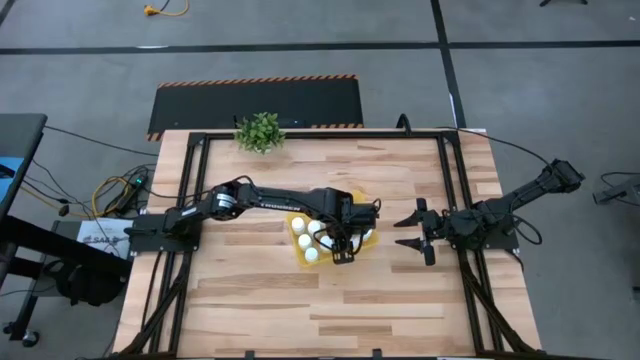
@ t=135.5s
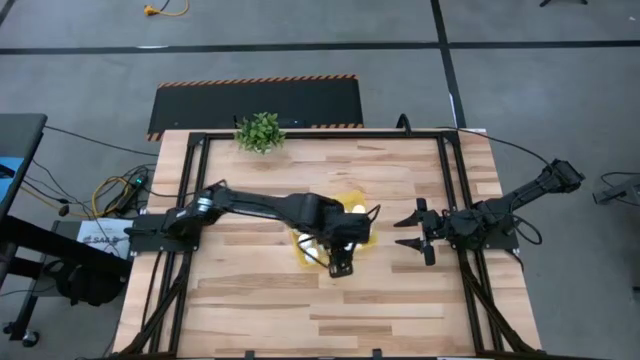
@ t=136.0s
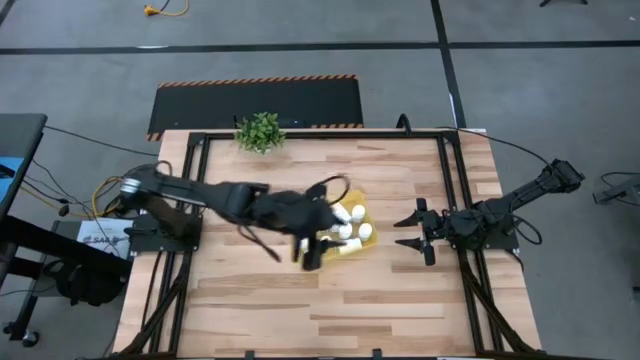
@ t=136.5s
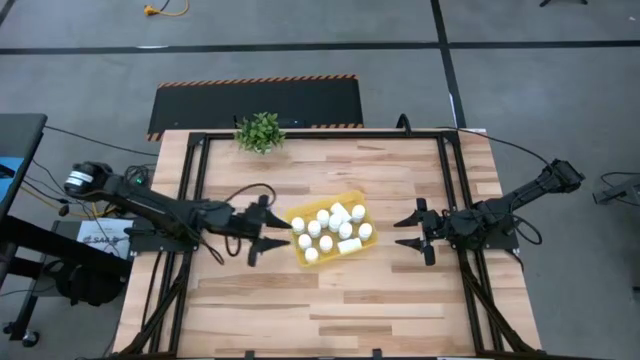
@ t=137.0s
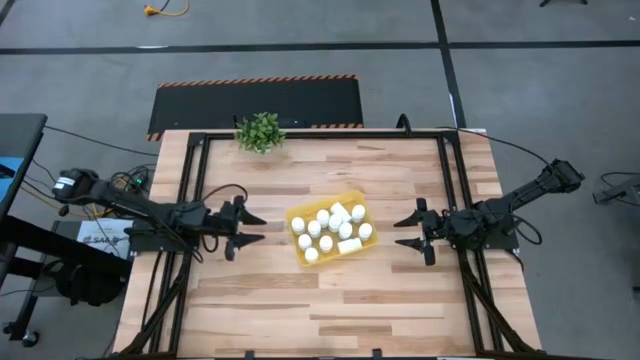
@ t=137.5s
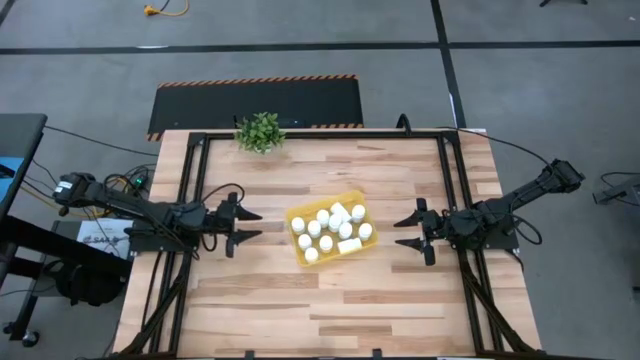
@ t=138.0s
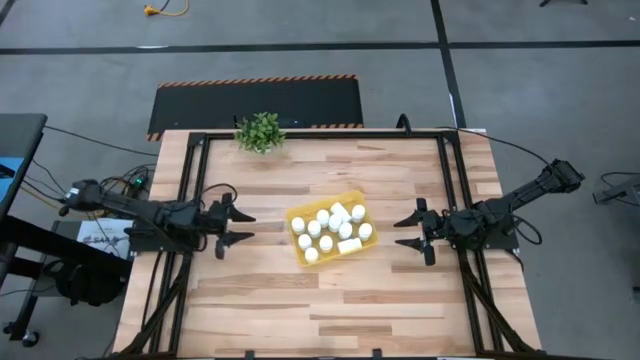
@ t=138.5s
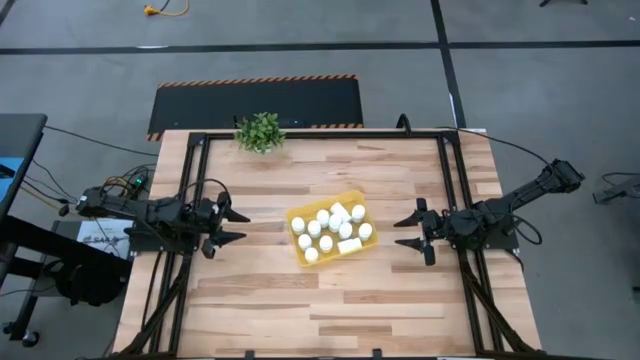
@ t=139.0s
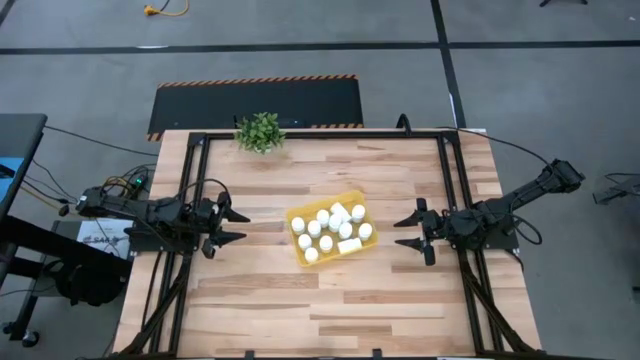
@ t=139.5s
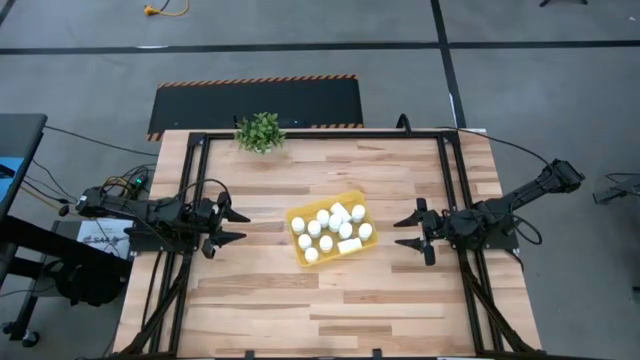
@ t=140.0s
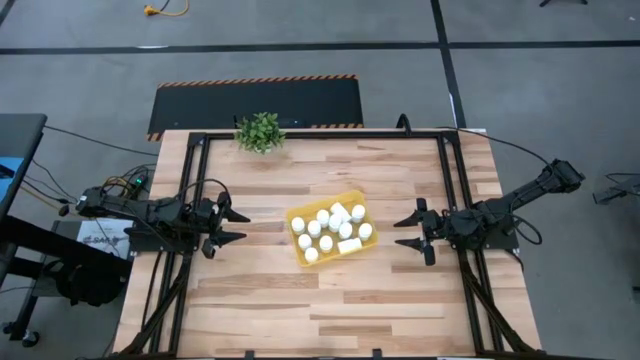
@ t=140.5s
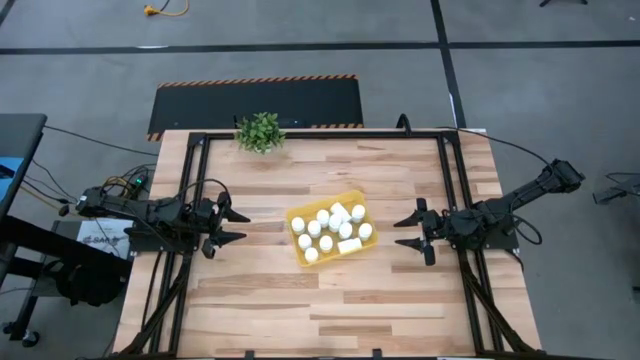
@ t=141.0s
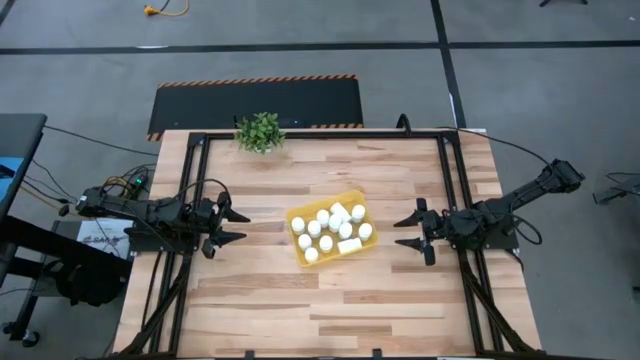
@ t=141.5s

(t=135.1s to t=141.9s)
Task: Pick and place pill bottles into a basket
Return to Home Position

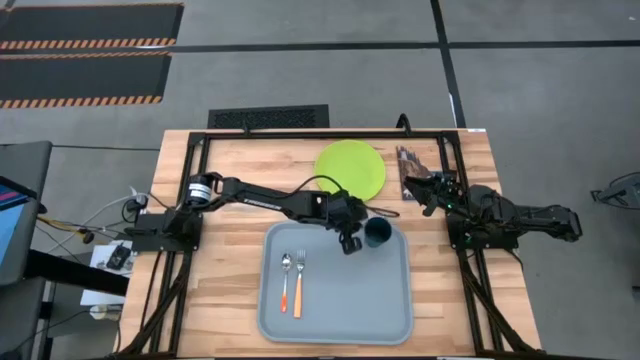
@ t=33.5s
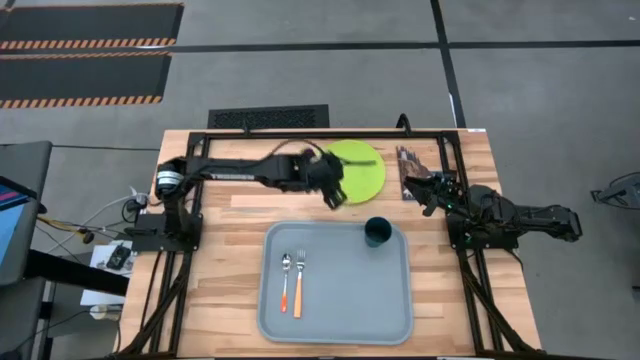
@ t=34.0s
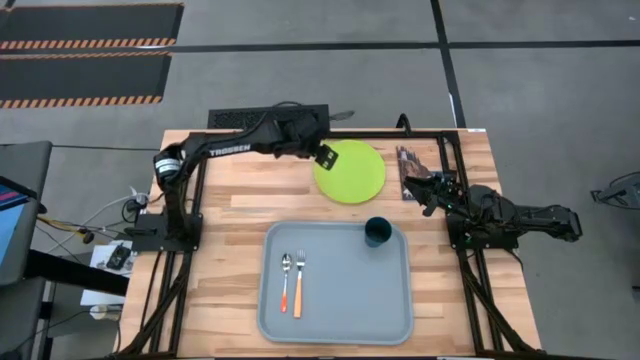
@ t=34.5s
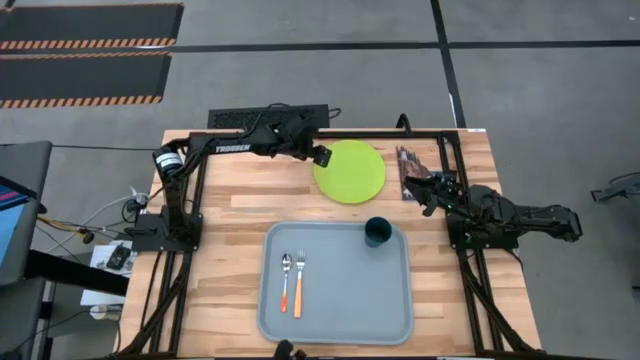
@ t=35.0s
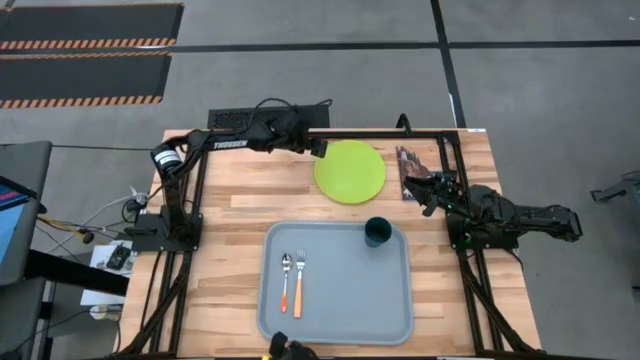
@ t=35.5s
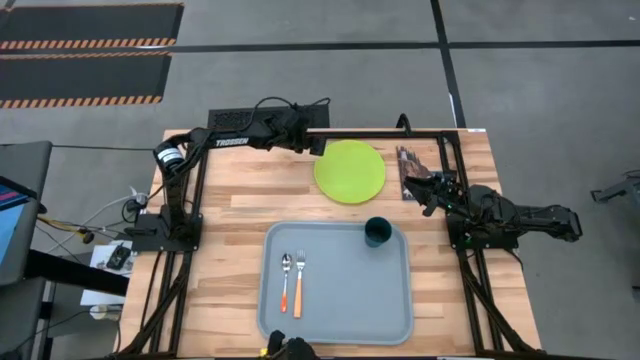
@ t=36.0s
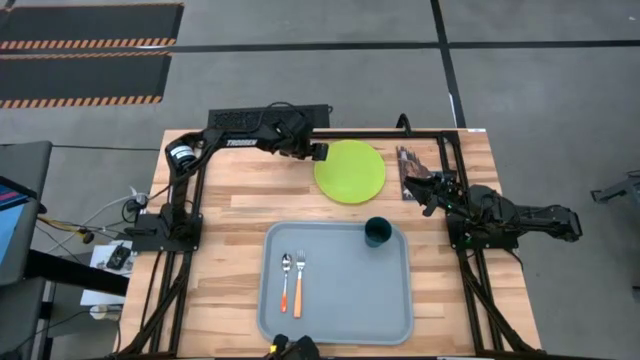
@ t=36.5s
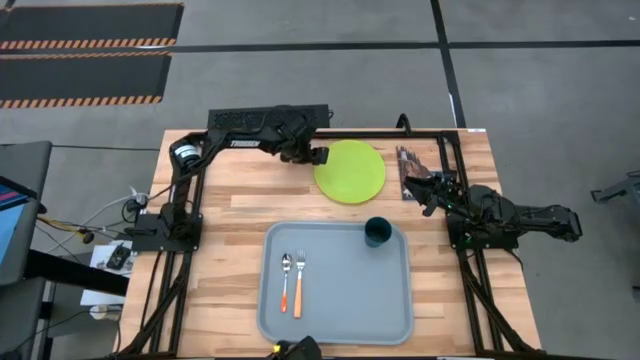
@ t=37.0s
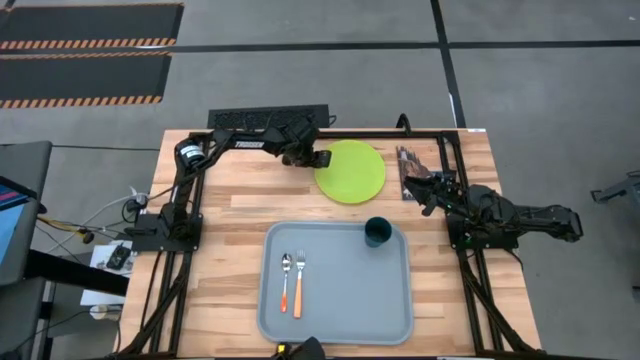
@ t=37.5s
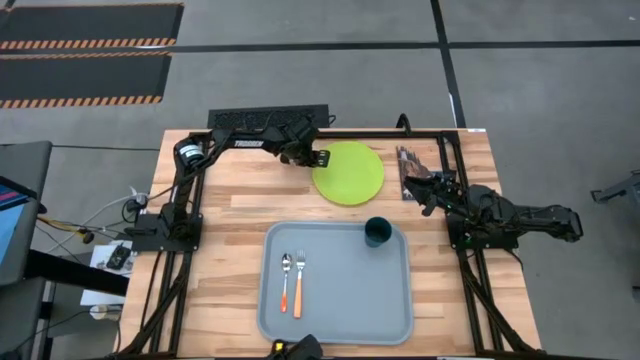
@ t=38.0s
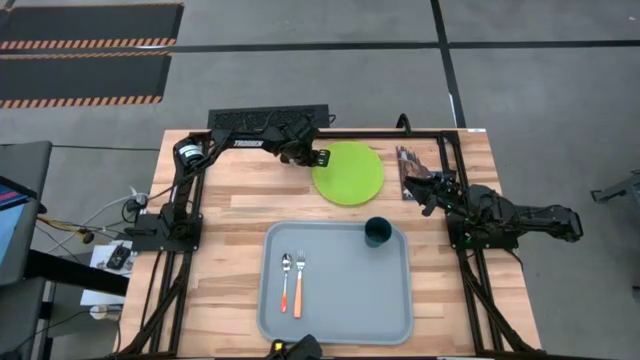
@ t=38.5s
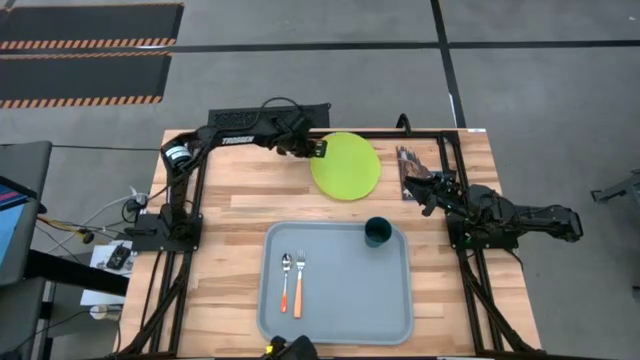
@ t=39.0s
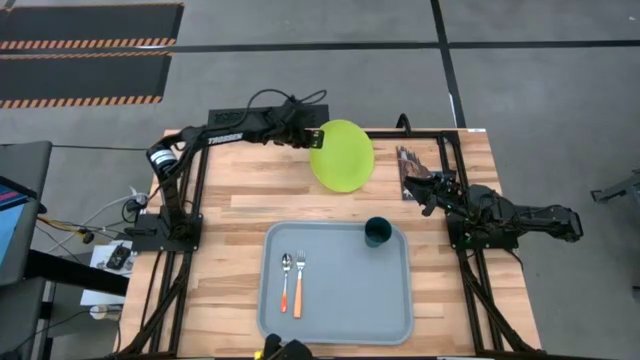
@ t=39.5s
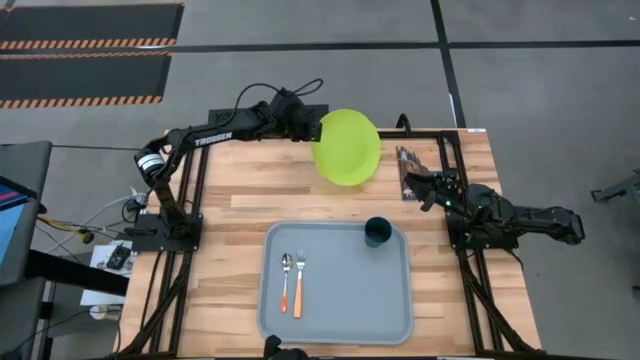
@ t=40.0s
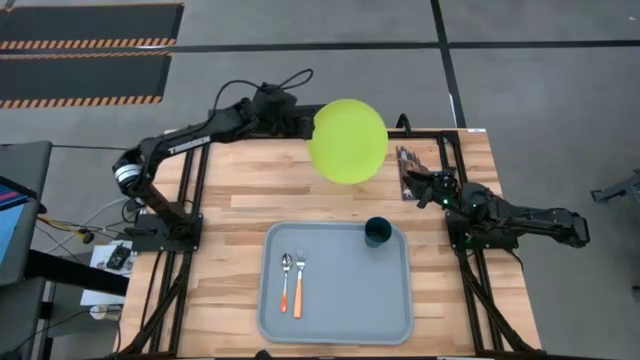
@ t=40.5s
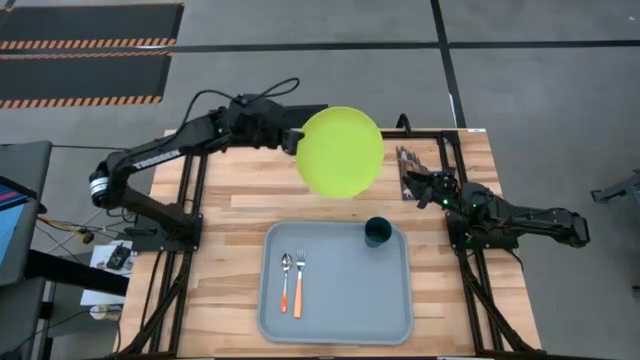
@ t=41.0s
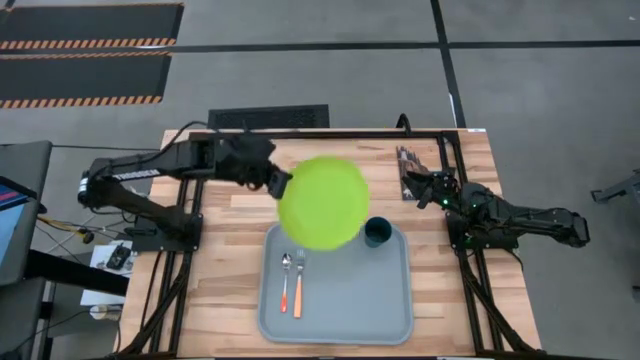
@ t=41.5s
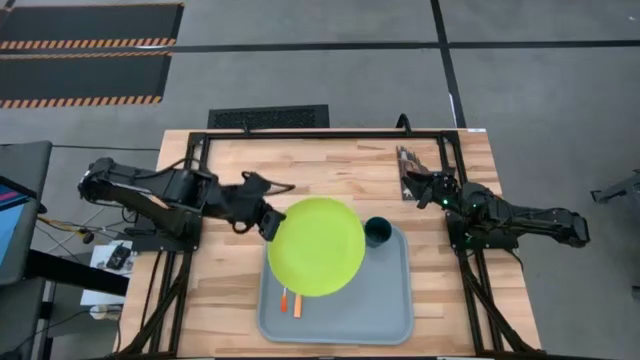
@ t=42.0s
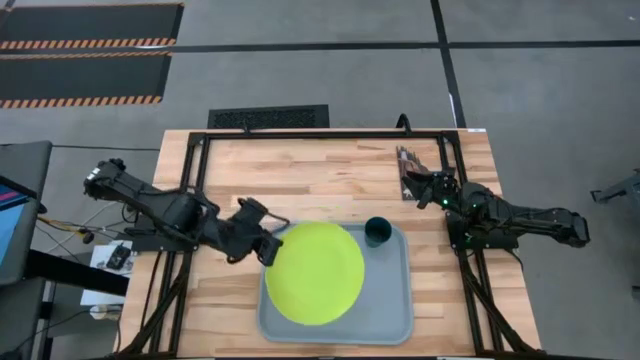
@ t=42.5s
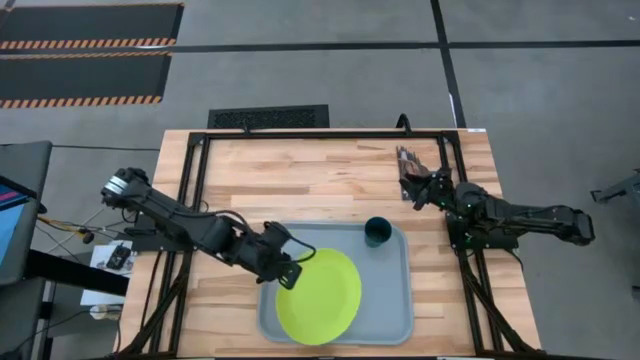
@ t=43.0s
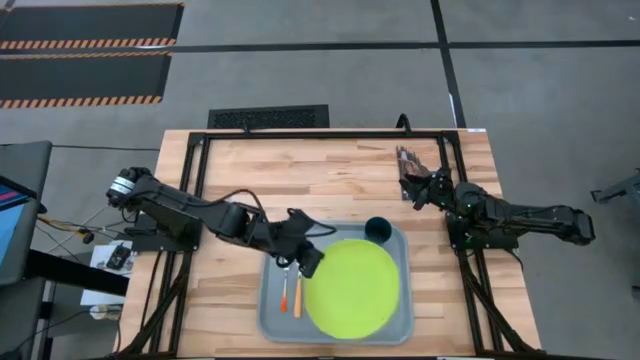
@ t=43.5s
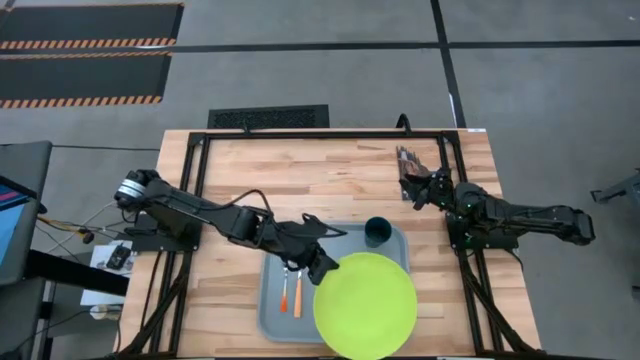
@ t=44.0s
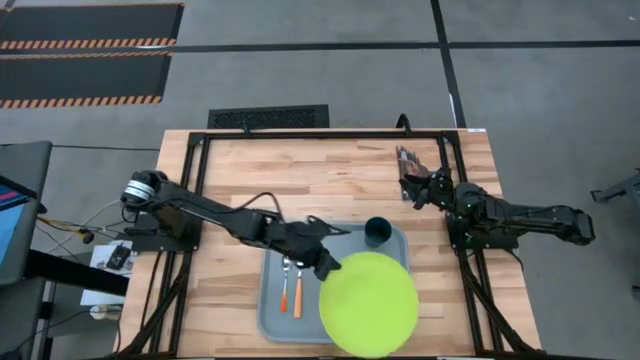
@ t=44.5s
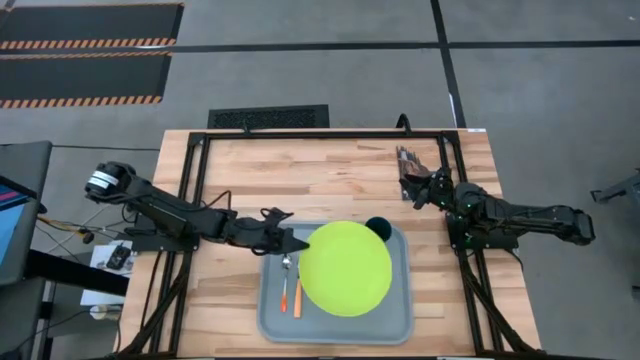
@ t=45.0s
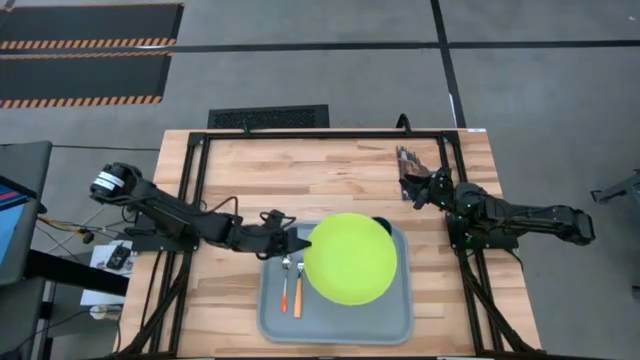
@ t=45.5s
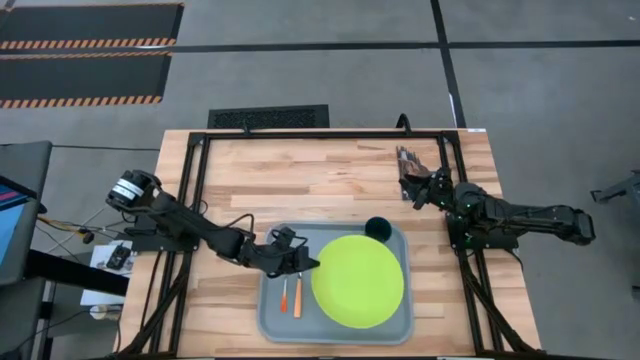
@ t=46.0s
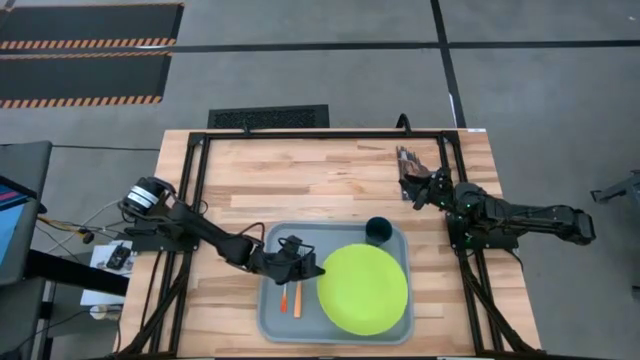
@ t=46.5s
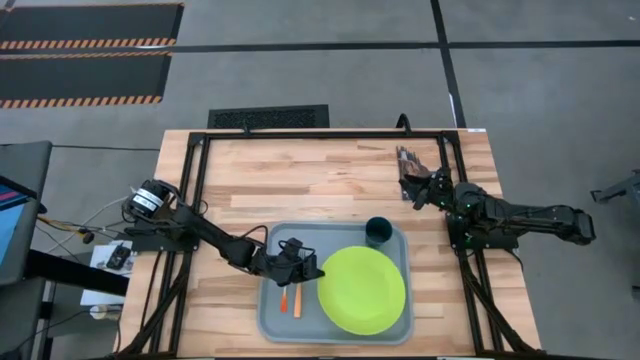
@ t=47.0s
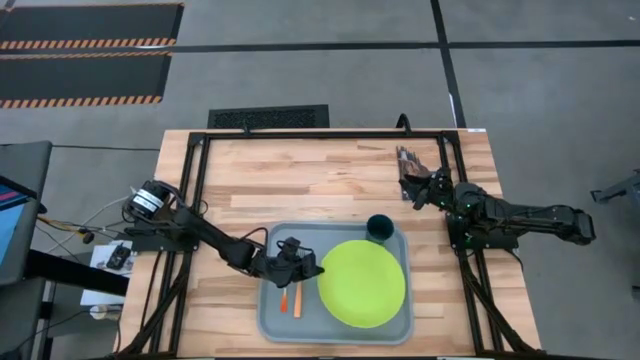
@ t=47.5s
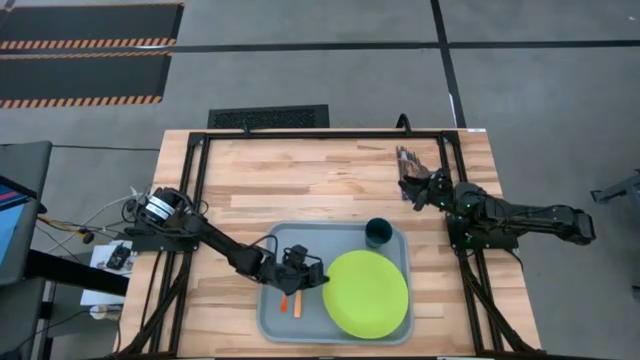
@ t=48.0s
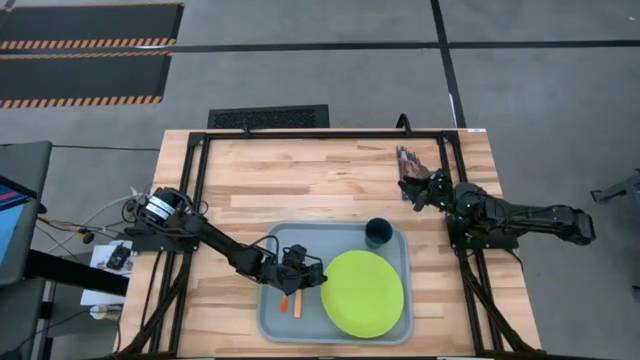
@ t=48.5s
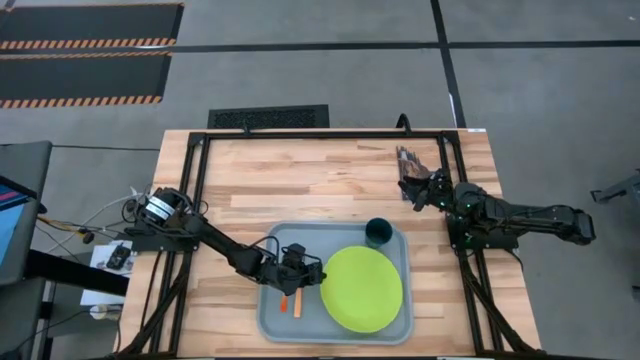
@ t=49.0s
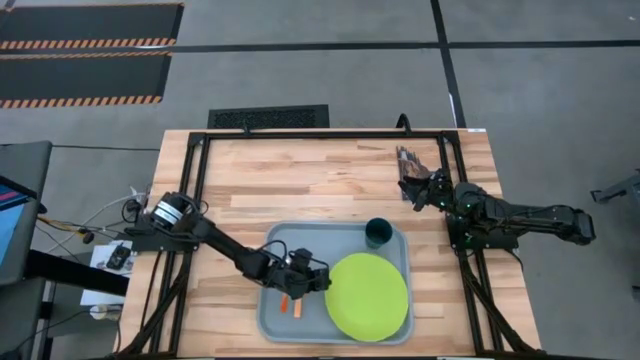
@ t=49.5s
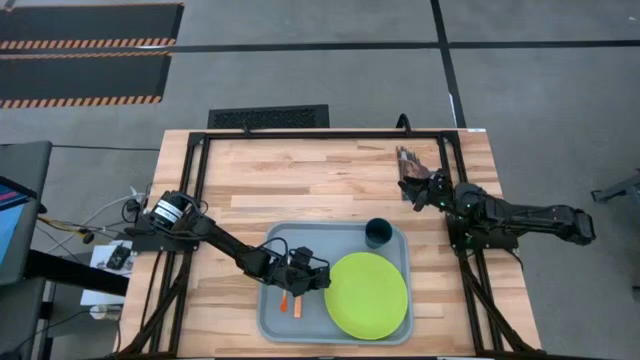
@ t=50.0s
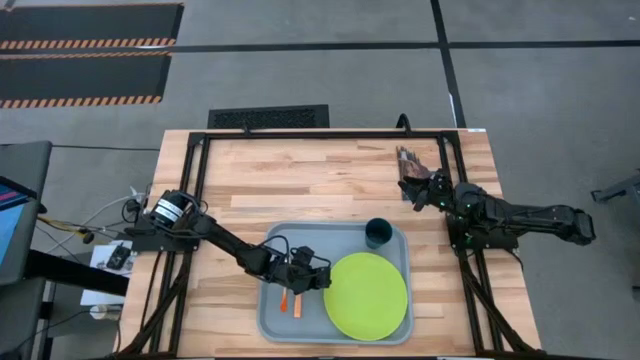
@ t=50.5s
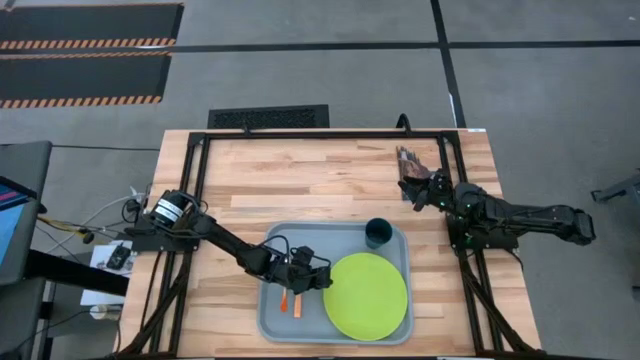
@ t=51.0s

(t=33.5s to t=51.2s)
Task: Pick and place plate/cup/fork/spoon on tray
Put the light green plate on the gray tray to the right of the yellow fork
